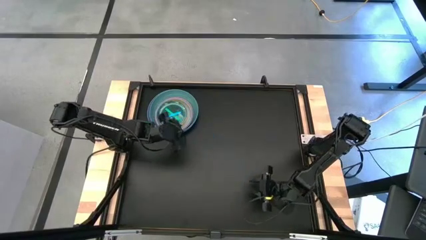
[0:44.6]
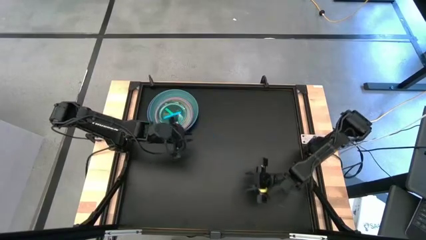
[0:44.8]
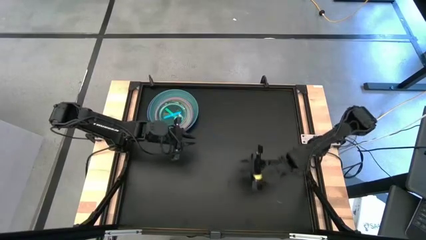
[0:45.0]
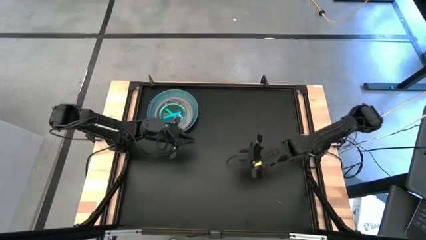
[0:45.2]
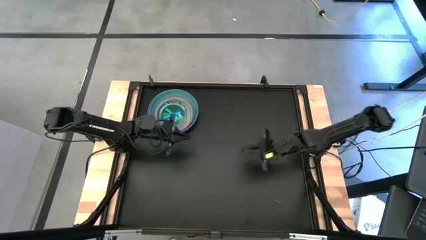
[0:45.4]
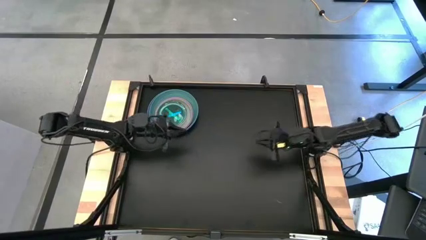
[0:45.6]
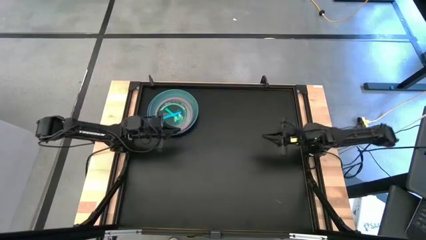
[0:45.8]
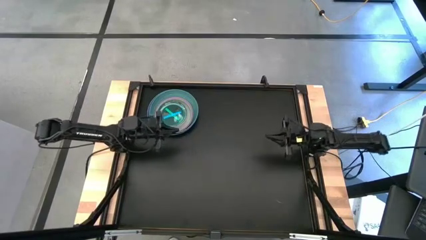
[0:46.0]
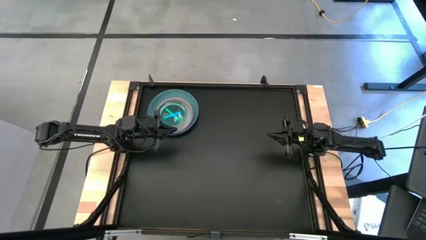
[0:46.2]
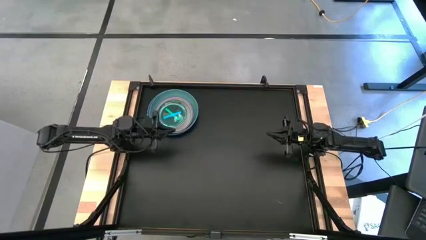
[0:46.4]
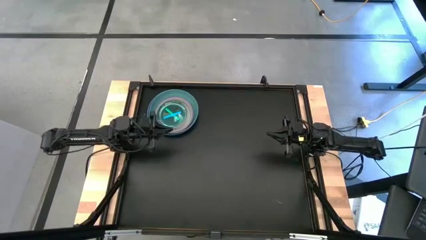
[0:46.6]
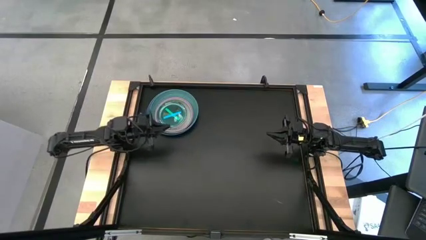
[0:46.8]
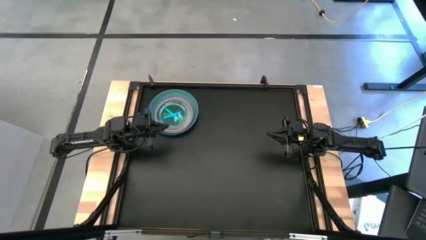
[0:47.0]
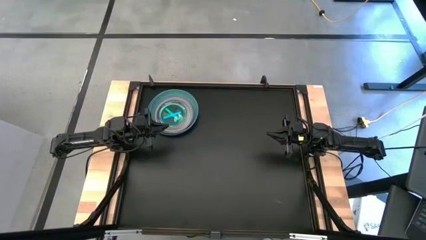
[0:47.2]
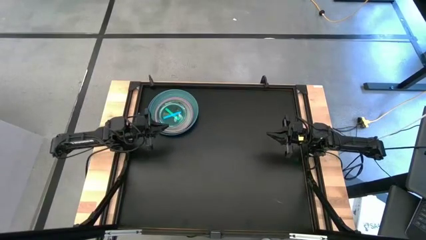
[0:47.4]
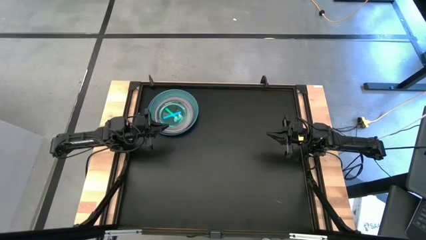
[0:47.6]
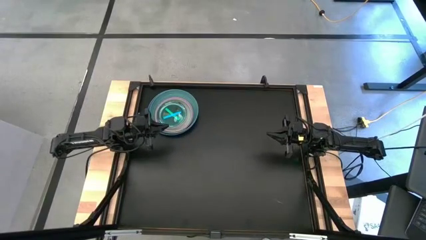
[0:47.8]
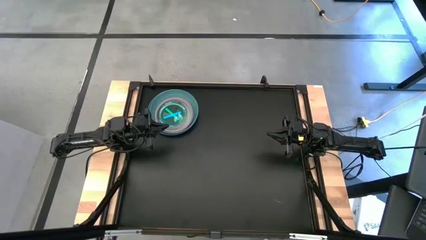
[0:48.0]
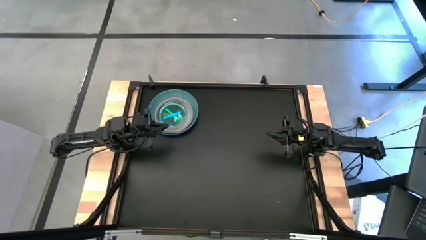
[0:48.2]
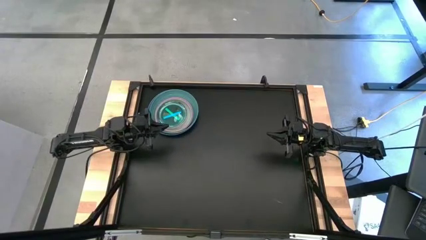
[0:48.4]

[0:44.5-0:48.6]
Task: Stack plastic plates
Return to Home Position

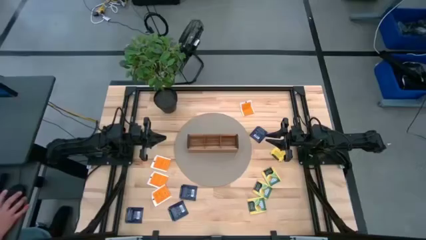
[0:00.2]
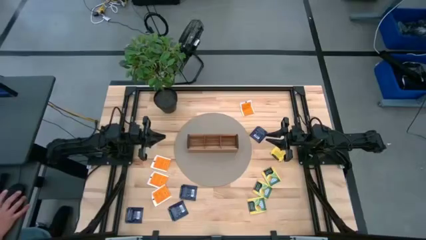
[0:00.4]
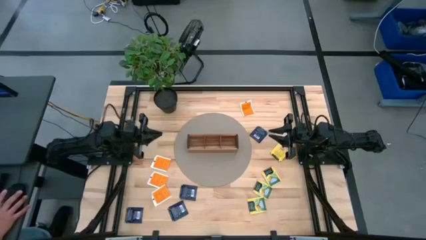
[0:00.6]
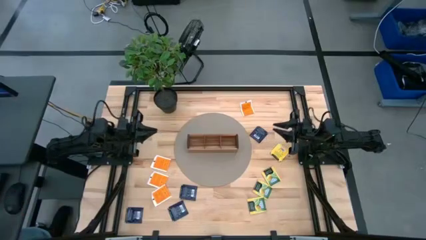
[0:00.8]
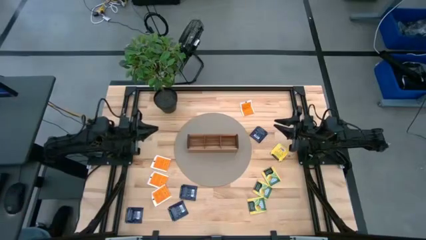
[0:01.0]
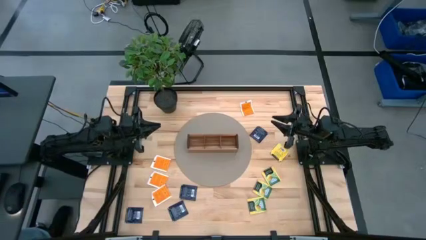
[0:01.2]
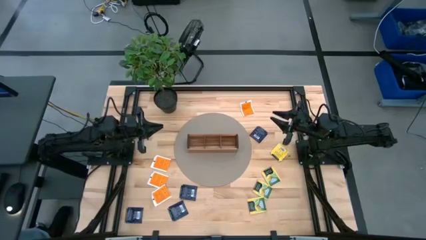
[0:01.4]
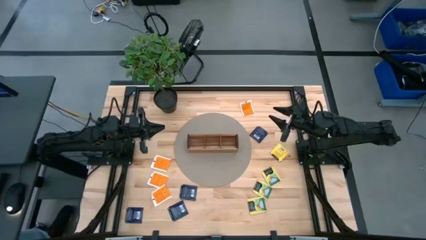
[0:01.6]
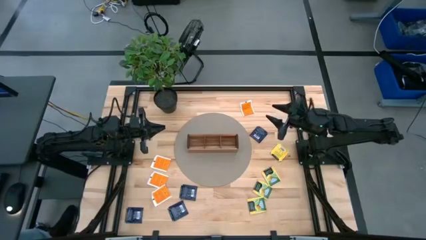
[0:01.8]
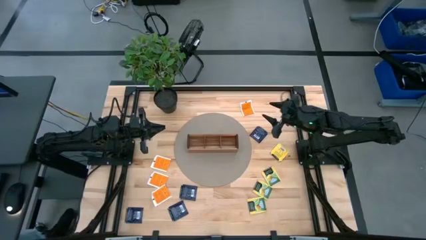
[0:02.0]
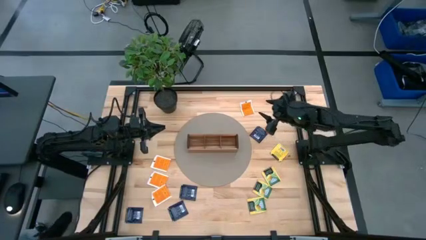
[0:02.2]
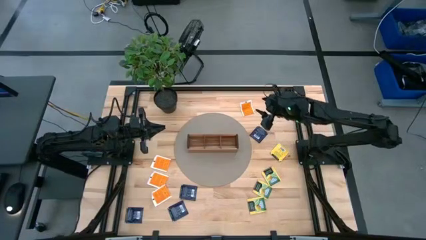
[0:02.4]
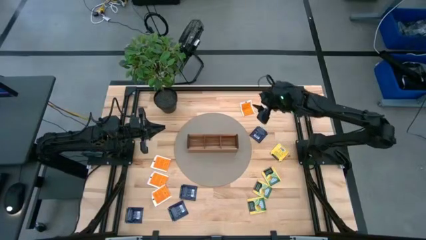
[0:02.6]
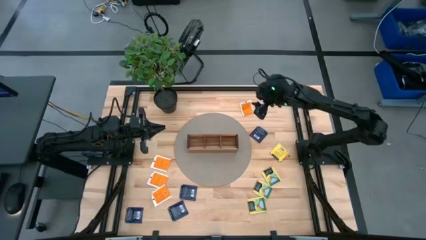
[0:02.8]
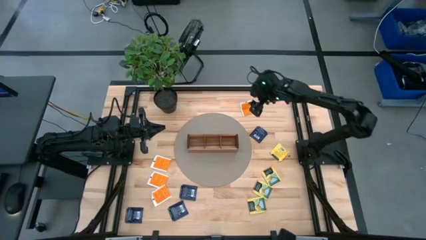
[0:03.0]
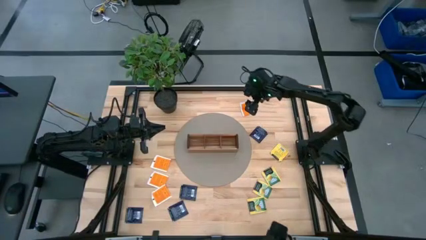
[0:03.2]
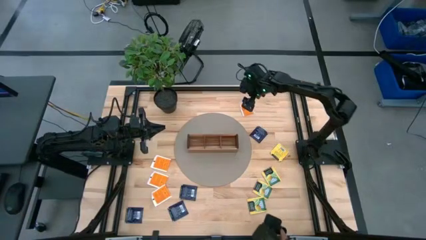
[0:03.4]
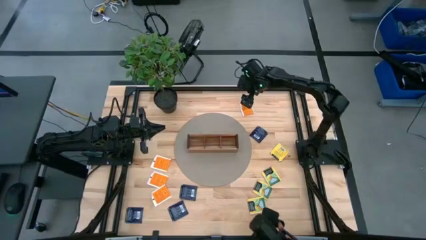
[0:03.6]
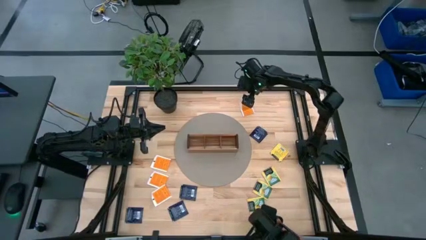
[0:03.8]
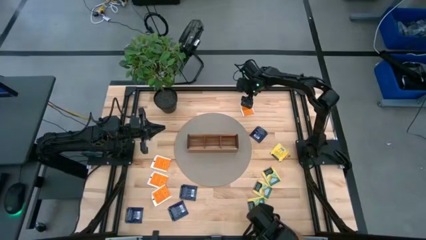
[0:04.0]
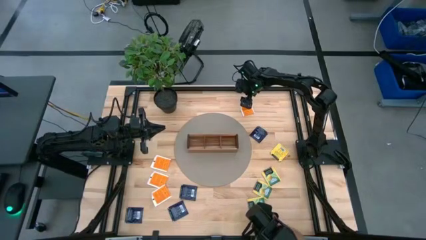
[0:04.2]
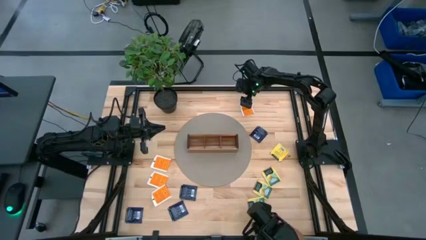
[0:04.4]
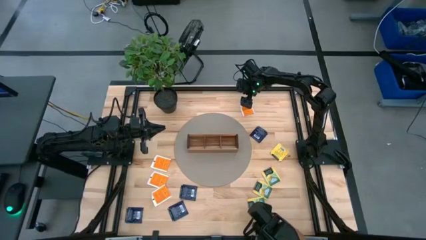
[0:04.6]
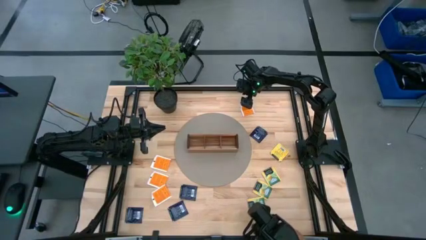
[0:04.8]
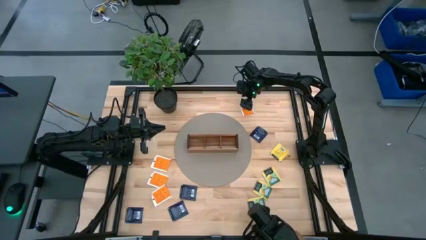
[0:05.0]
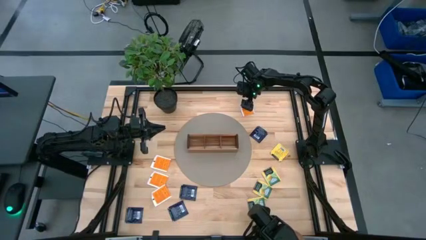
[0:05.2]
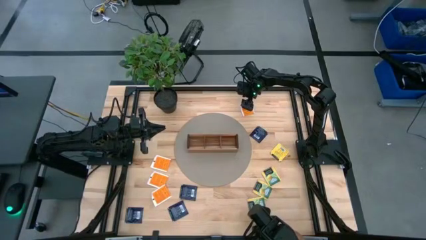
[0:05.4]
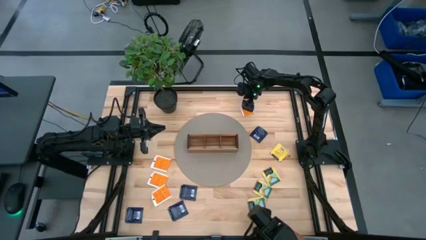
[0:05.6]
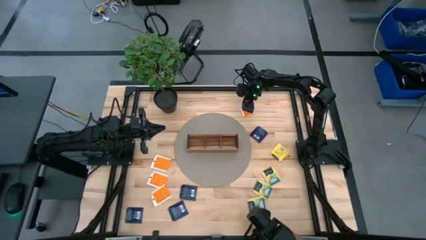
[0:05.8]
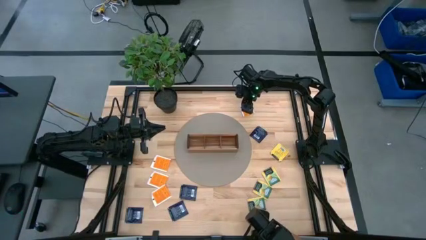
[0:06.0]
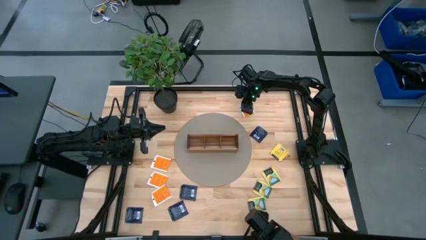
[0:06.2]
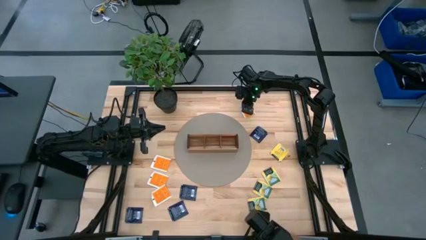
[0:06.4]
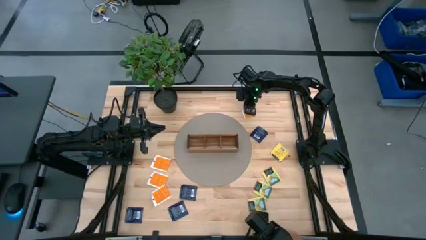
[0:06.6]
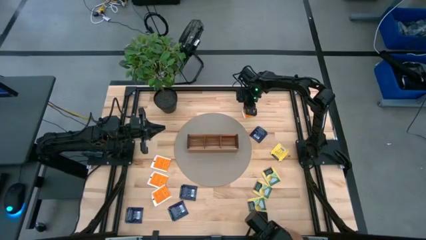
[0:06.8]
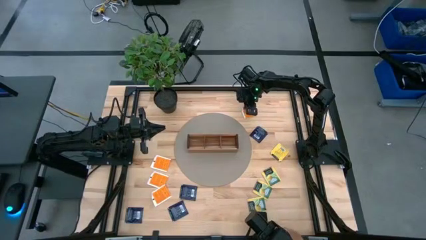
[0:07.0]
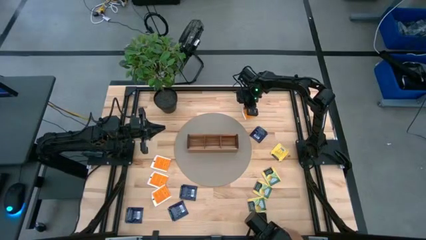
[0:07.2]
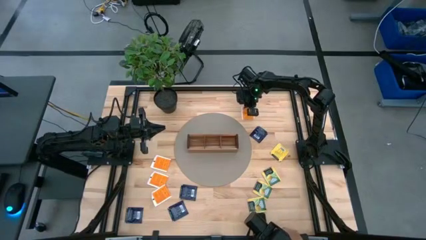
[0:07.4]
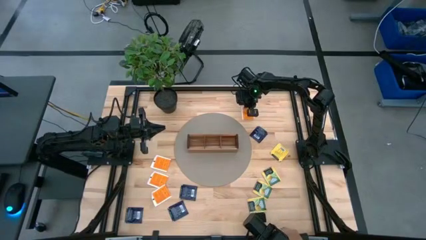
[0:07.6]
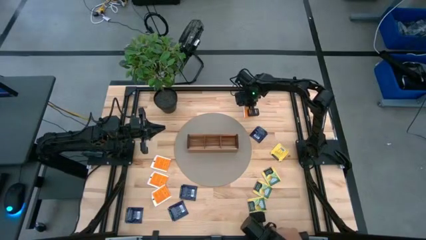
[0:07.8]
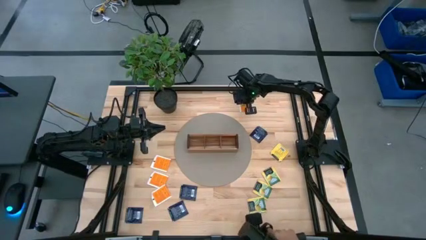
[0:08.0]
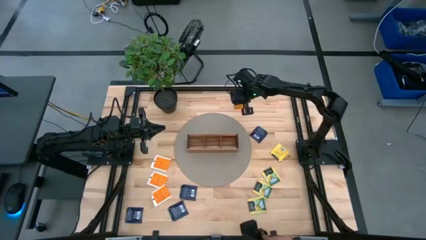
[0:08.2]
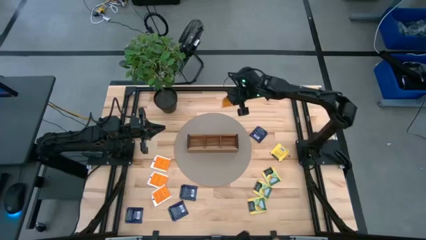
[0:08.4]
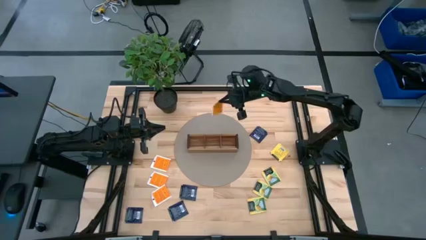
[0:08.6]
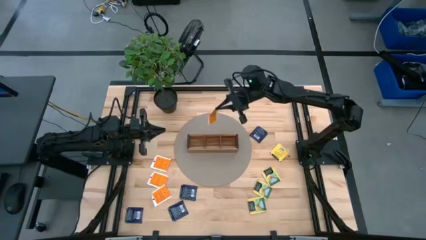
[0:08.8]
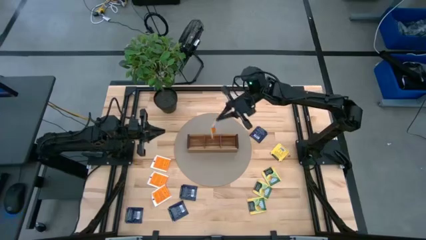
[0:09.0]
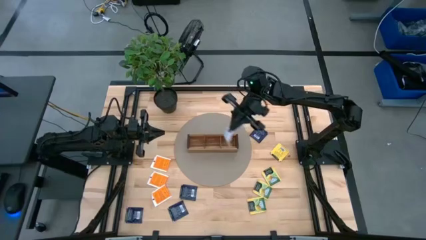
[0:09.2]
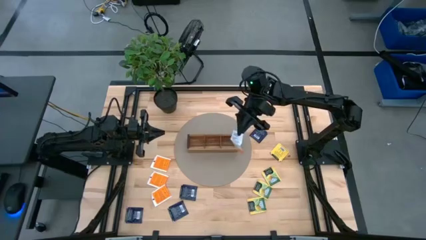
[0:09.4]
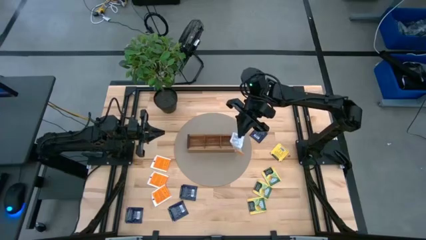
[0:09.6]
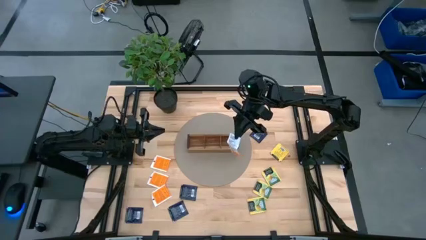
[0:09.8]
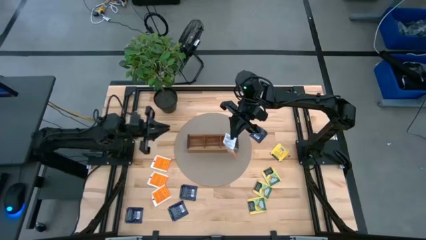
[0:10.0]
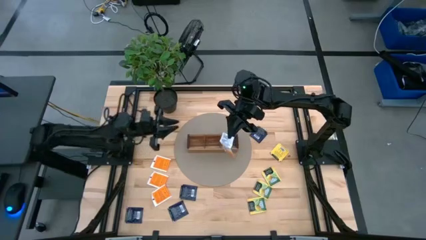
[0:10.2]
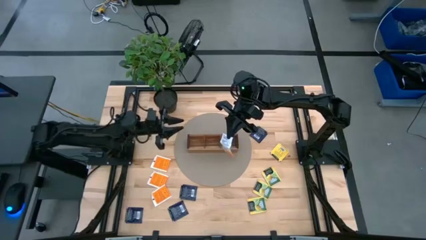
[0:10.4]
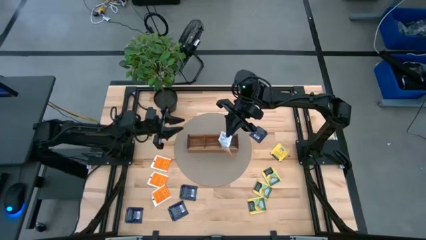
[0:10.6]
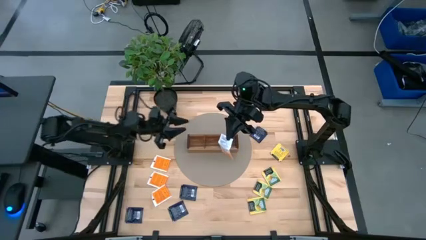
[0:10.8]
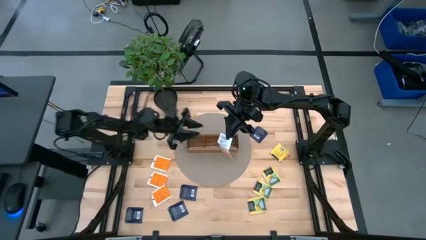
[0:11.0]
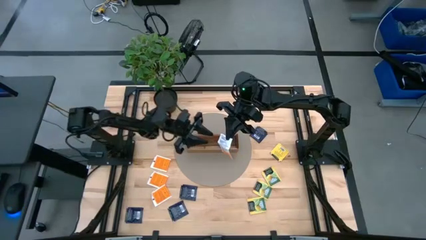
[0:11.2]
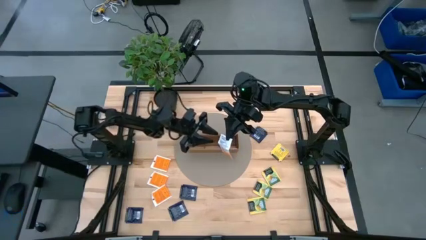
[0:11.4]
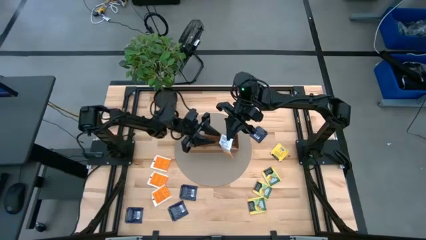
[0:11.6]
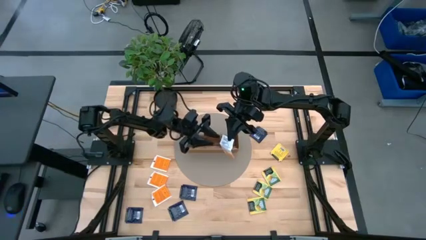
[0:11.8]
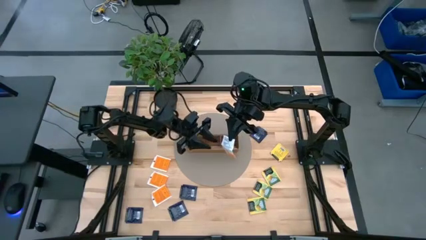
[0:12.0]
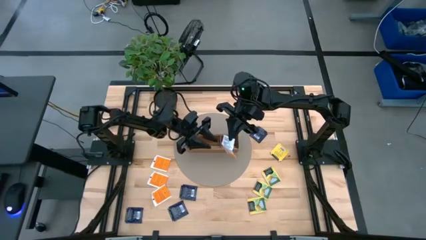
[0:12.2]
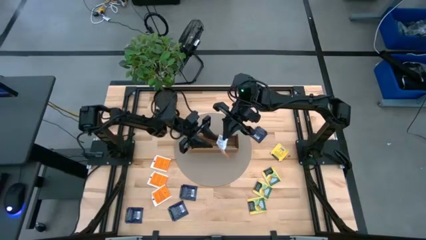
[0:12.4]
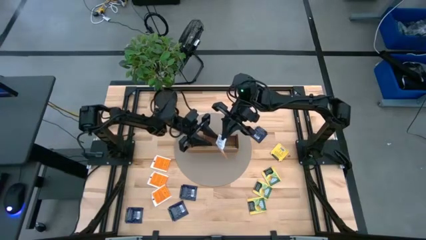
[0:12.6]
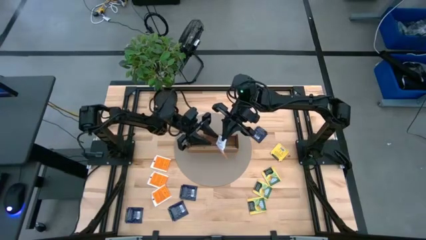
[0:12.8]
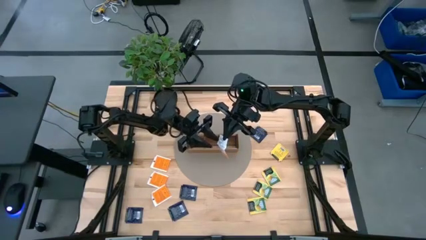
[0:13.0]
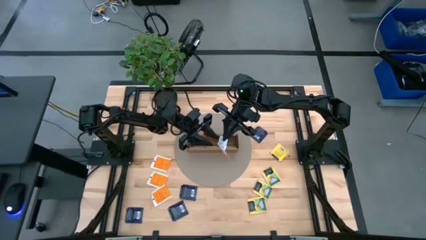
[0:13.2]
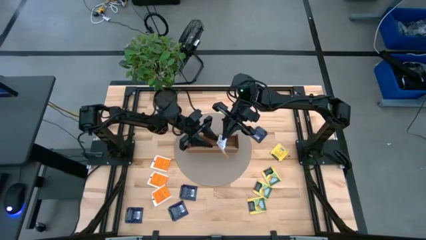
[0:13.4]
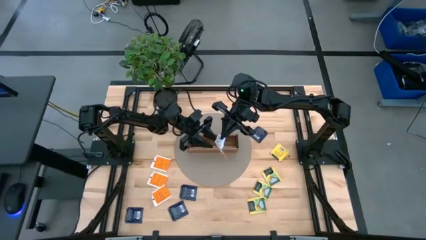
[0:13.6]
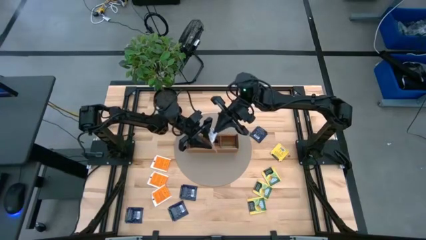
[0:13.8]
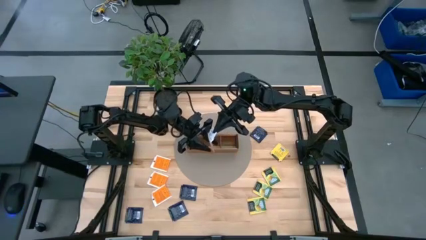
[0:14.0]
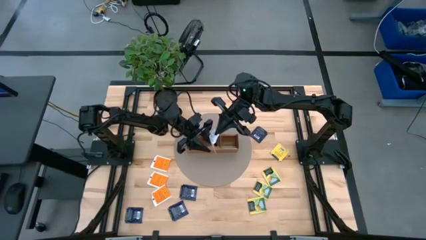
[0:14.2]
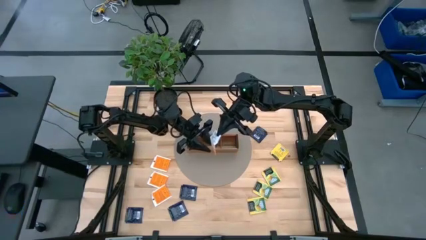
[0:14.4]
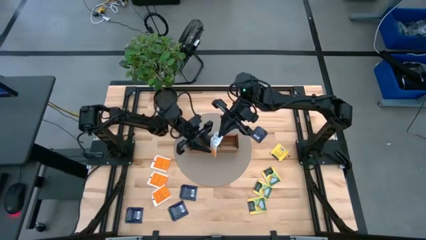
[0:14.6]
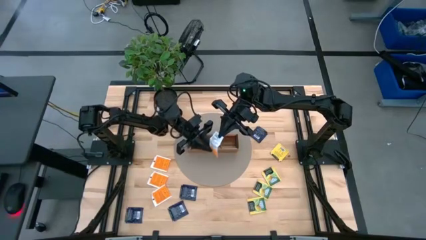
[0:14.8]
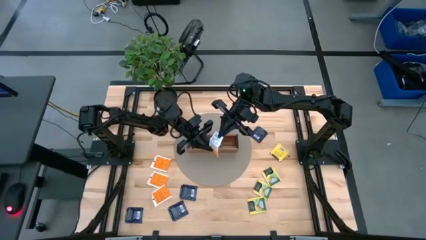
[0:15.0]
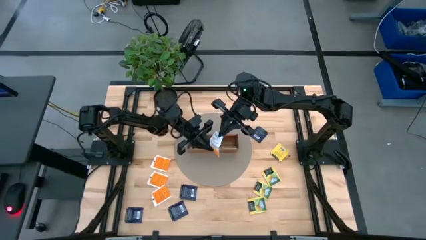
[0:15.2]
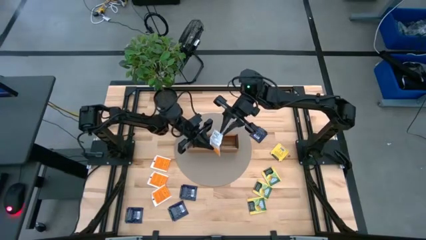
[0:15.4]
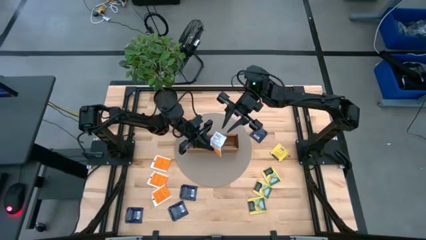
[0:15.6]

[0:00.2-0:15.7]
Task: Pick & Place Tea
Put the orange tea bag into the left section of the wooden organizer
